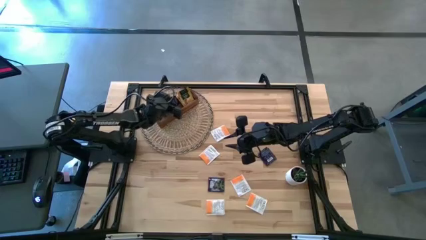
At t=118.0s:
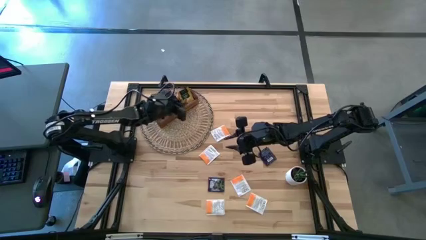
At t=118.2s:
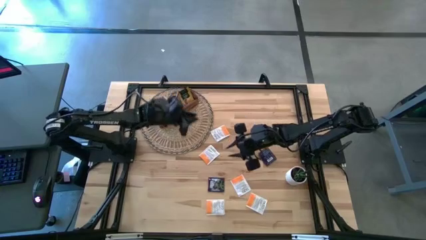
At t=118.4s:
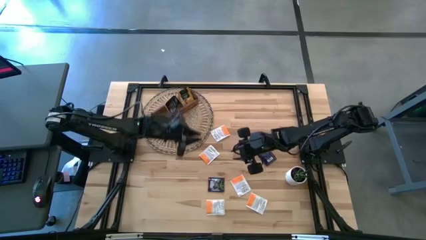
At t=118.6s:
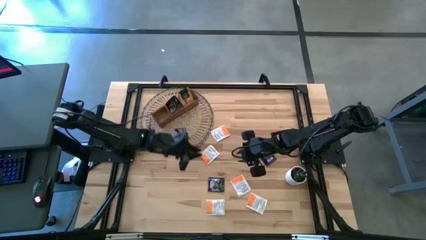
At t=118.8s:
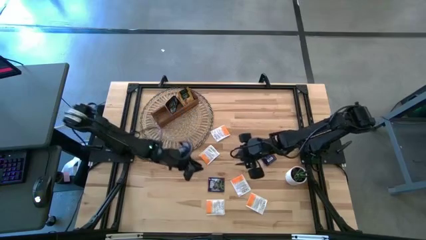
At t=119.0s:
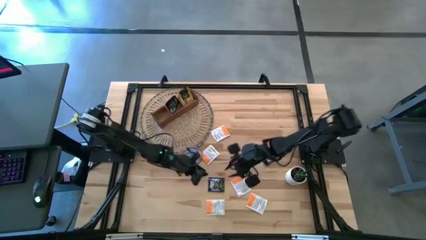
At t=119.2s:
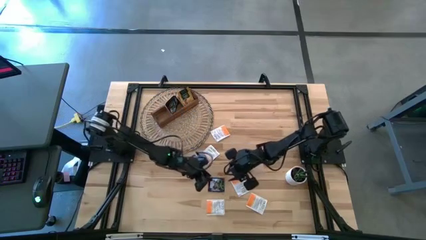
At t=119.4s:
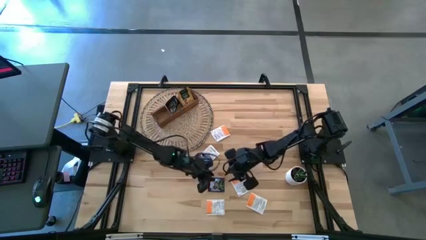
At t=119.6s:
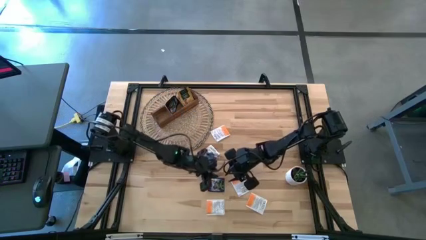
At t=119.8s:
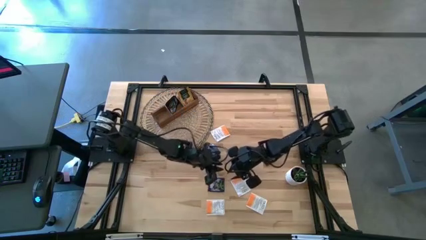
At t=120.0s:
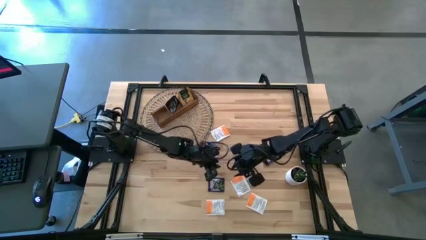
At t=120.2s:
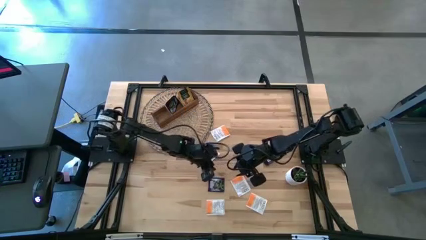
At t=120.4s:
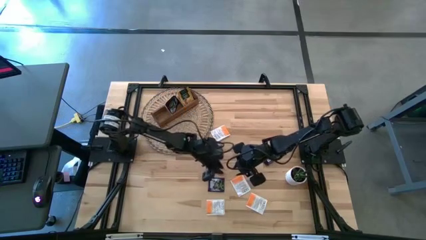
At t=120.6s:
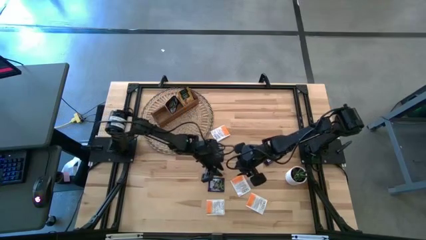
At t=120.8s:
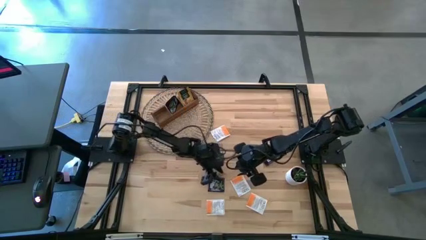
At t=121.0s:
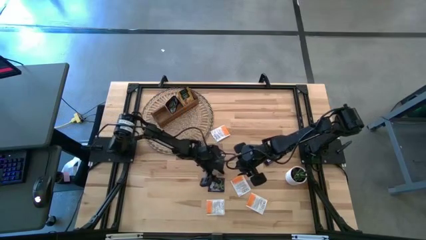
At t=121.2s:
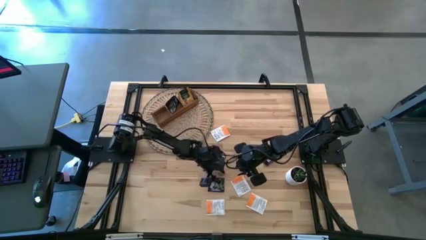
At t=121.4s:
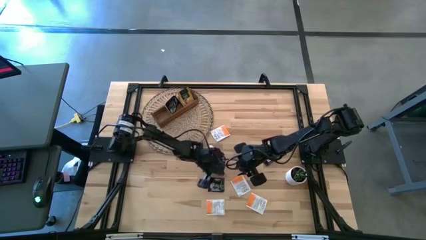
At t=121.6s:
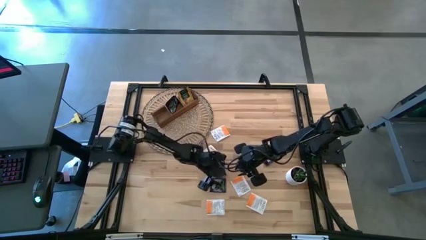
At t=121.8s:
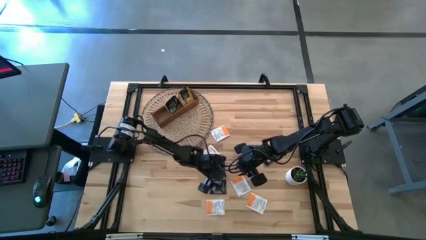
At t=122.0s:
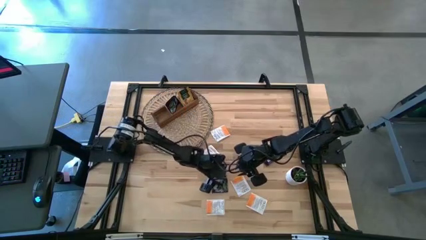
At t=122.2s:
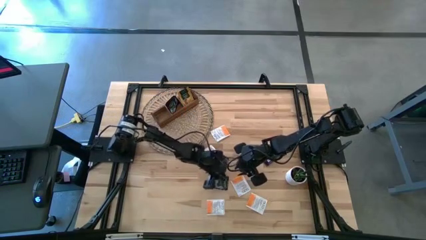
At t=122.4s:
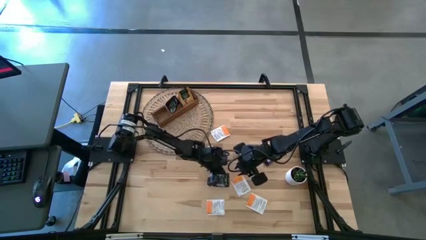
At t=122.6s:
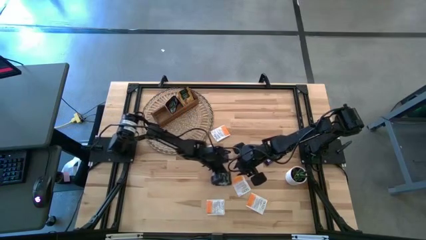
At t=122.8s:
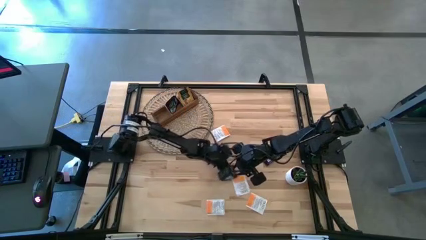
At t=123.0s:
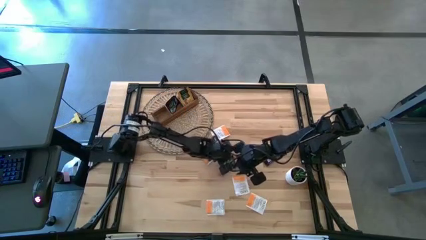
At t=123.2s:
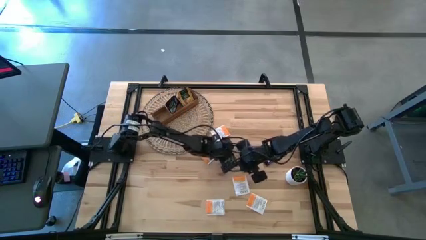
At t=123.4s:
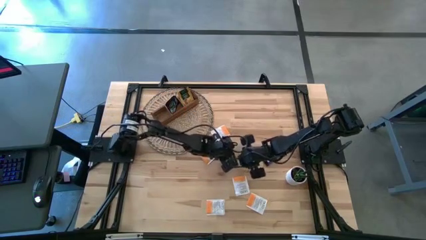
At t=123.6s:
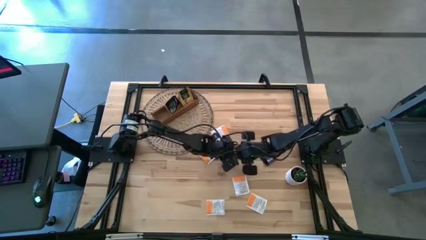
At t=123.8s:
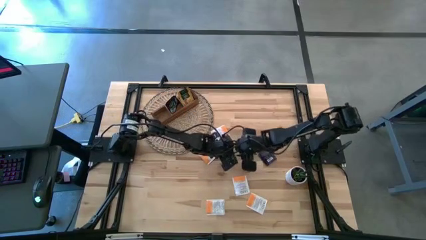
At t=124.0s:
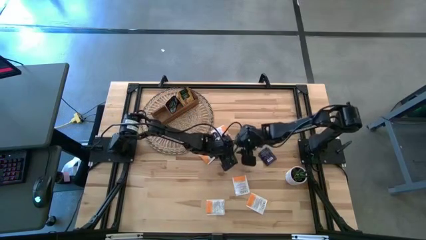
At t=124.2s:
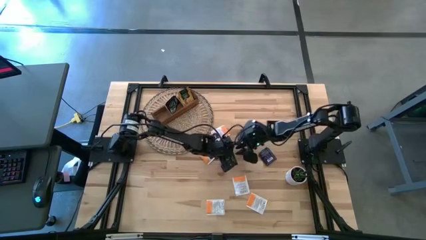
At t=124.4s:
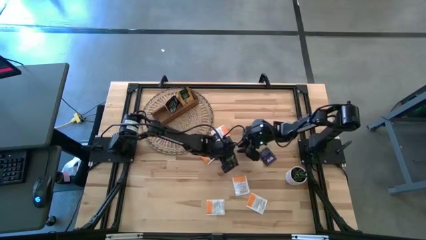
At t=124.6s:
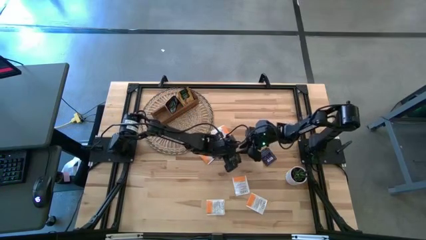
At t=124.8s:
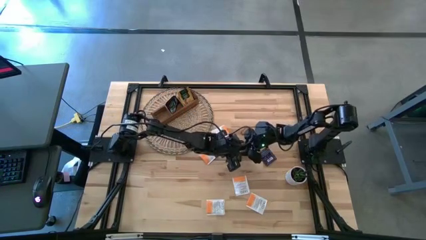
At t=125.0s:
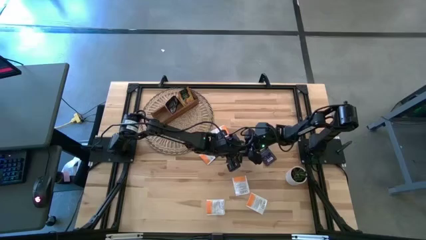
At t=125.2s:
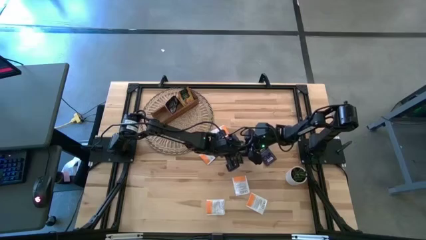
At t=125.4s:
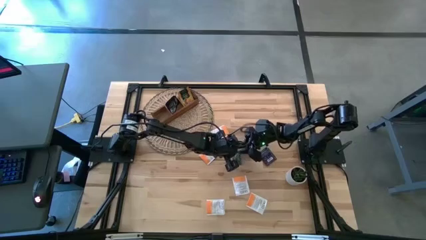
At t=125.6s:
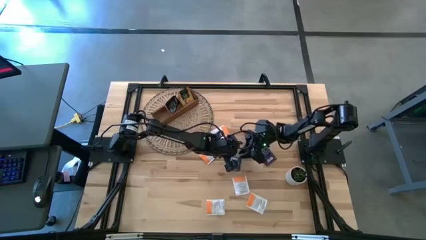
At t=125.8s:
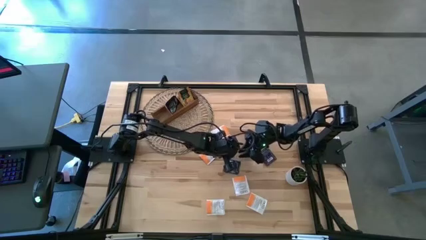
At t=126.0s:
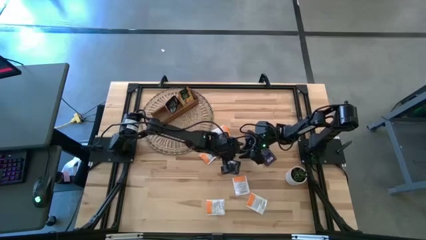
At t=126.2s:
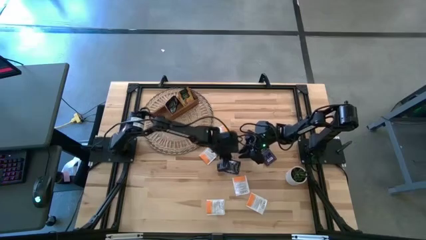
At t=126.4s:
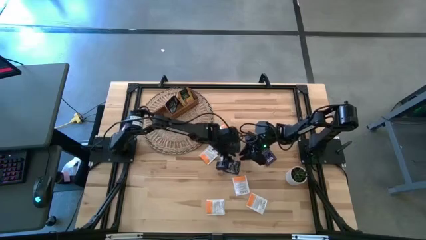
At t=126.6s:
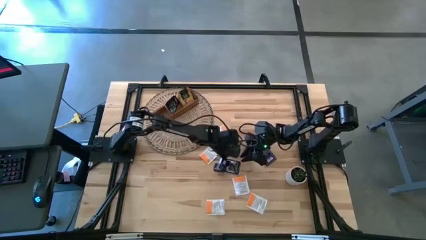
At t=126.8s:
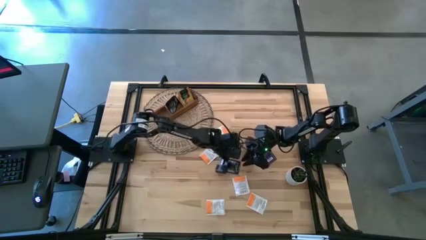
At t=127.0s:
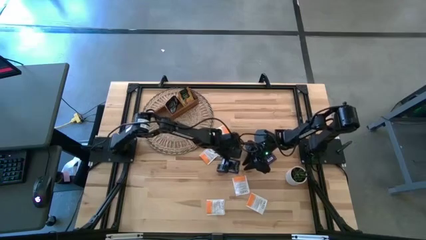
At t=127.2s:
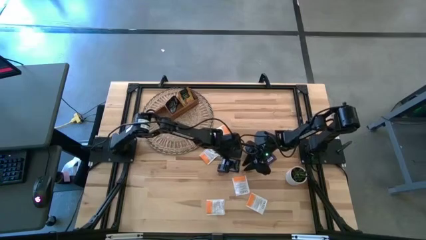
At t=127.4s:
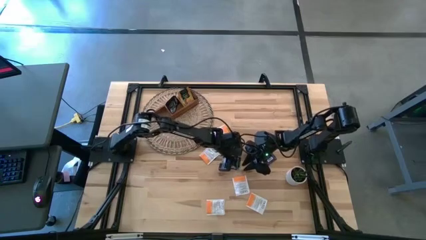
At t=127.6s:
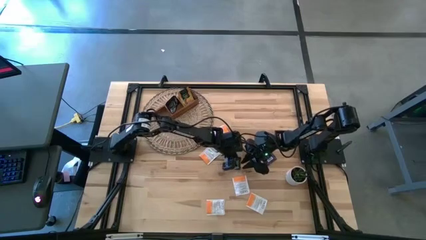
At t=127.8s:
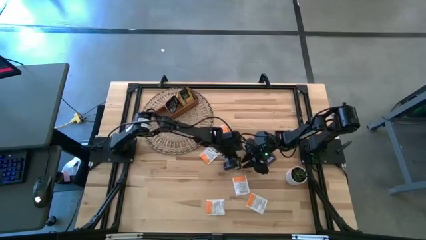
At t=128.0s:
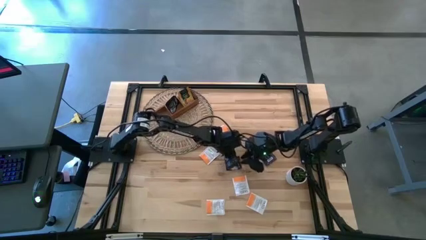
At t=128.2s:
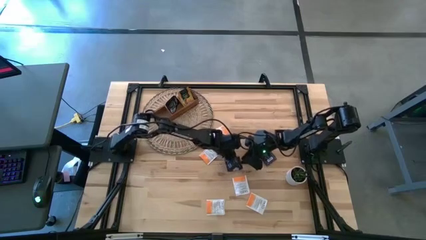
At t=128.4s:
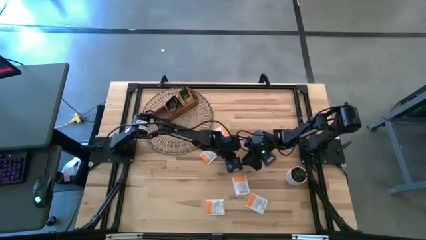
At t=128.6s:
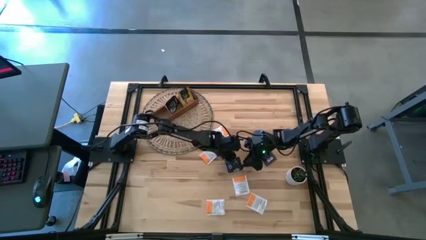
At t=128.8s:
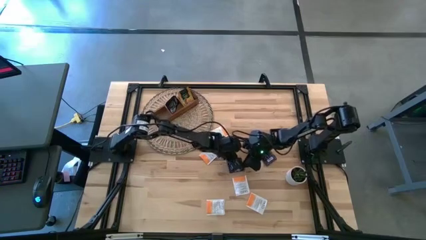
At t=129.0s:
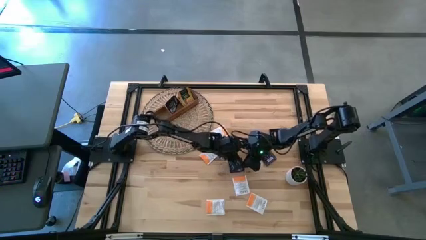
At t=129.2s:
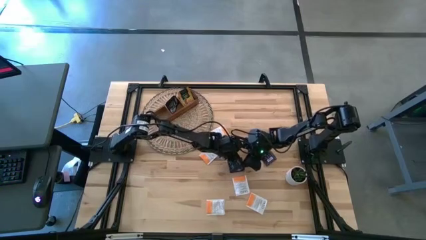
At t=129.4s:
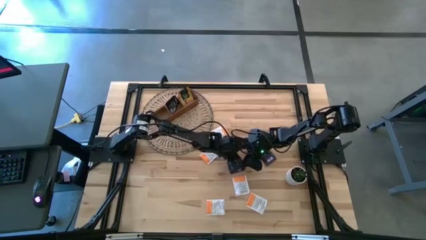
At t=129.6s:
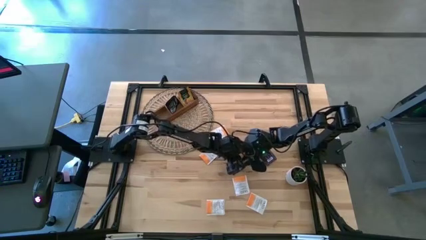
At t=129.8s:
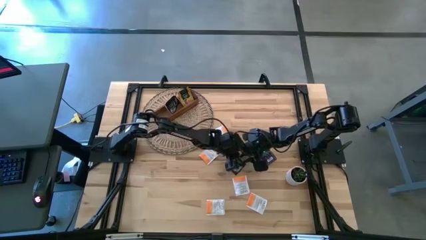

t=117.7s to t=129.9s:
Task: Pick & Place Tea
Put the purple tea bag into the middle section of the wooden organizer

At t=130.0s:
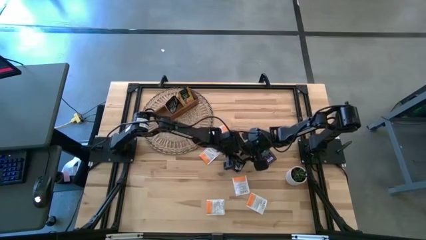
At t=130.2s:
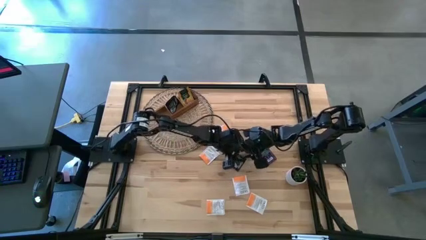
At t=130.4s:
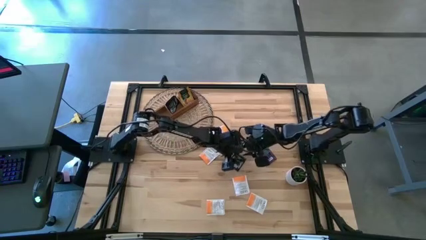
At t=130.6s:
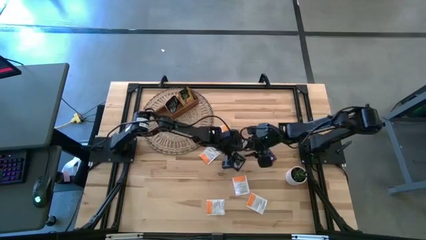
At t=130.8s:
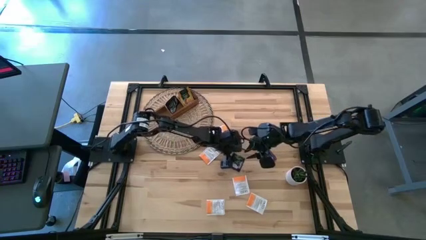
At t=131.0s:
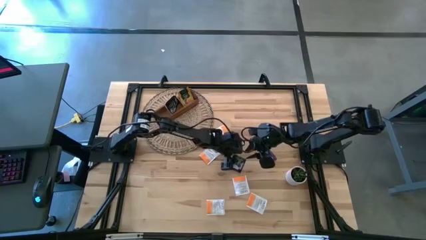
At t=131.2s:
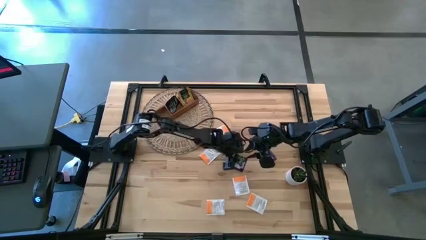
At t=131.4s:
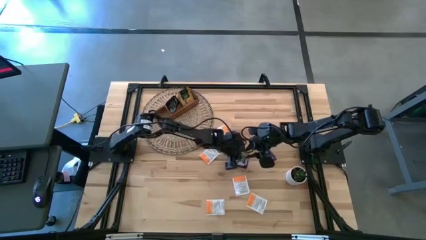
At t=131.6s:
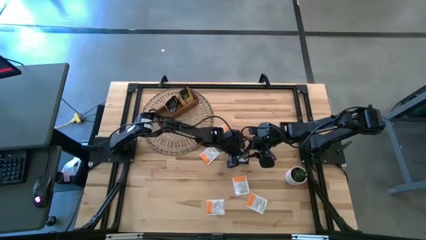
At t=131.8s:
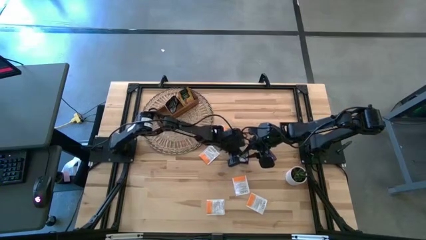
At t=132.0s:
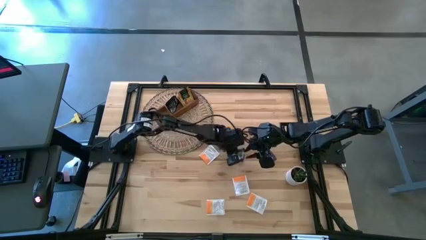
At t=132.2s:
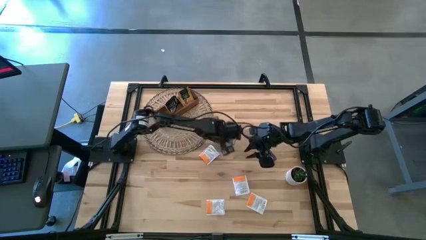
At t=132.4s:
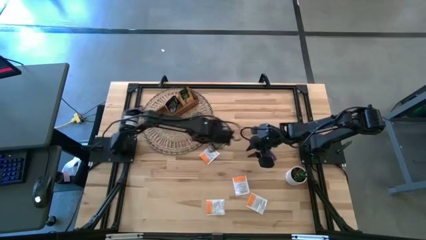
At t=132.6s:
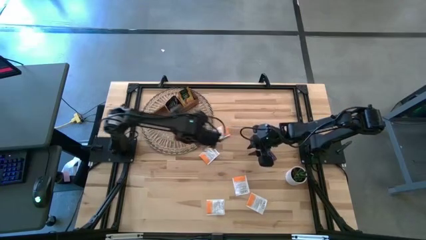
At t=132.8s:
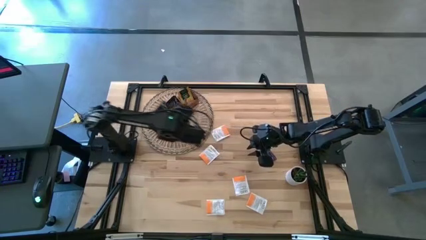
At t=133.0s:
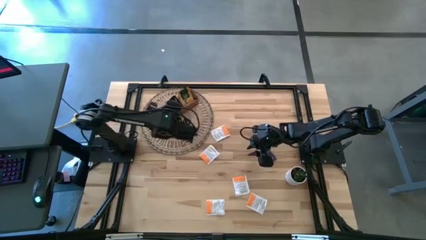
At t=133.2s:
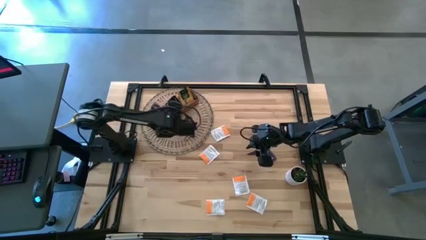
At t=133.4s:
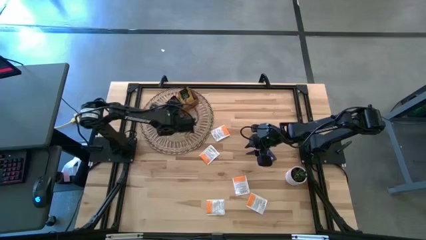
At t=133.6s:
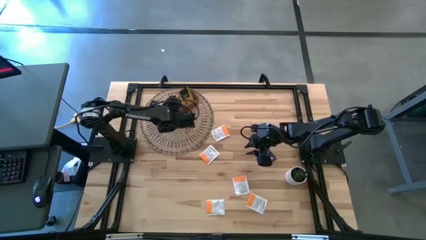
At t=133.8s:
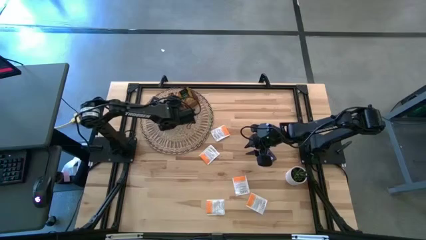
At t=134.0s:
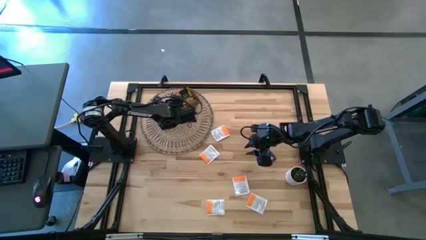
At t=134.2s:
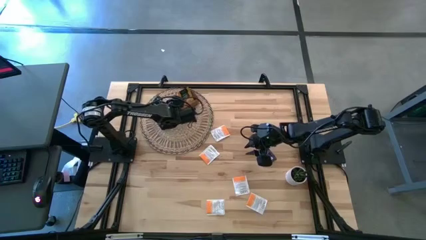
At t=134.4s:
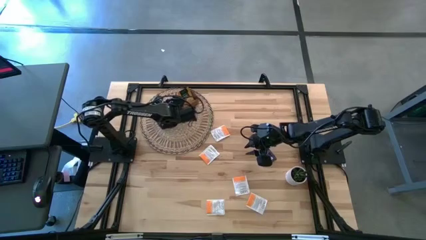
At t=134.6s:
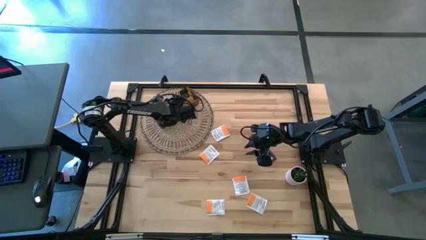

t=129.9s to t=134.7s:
Put the purple tea bag into the middle section of the wooden organizer
